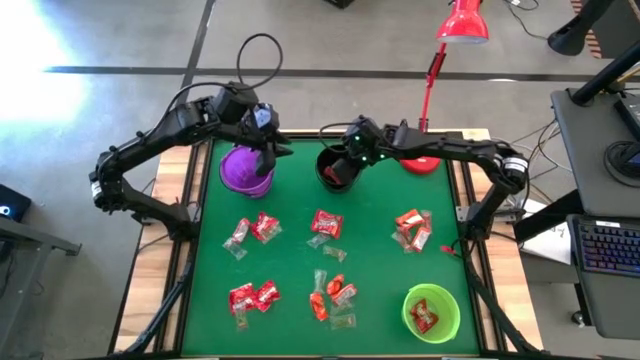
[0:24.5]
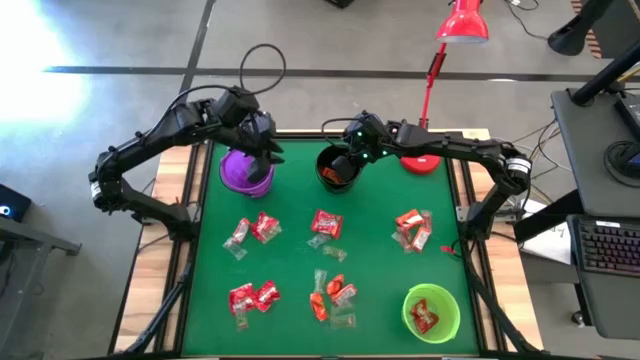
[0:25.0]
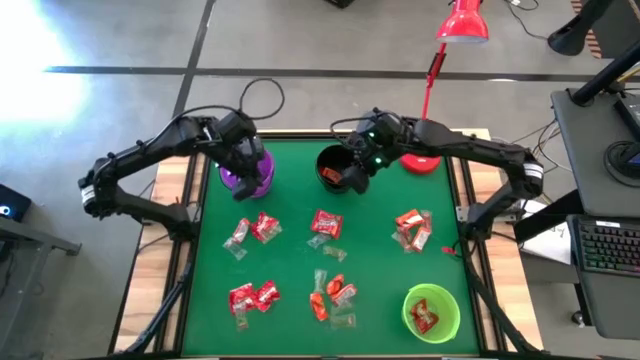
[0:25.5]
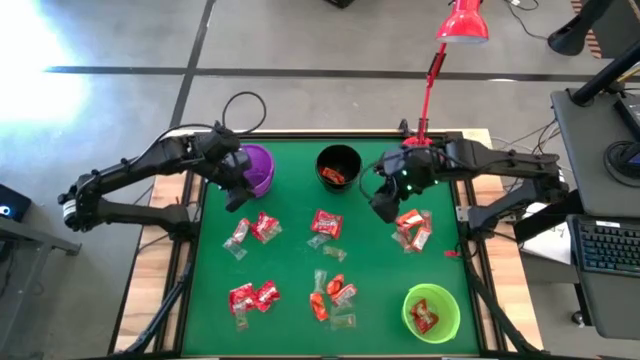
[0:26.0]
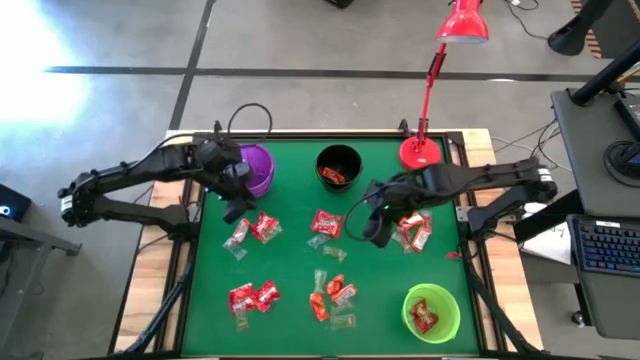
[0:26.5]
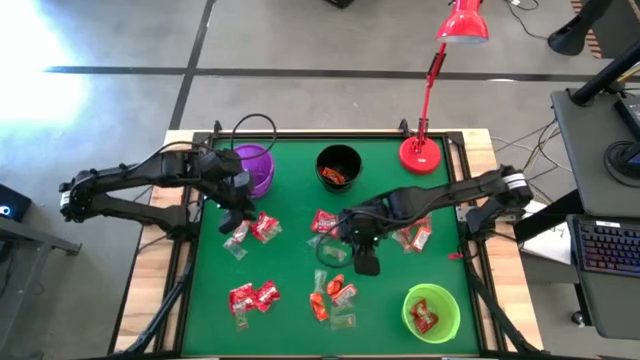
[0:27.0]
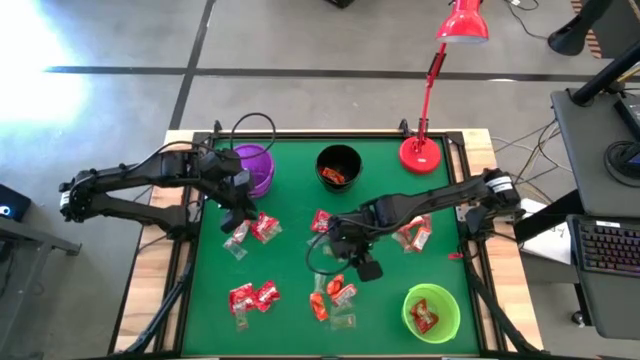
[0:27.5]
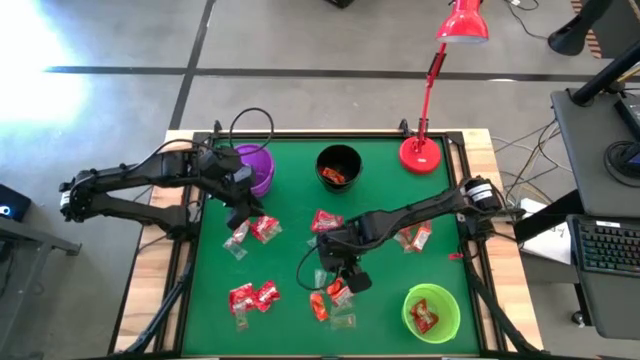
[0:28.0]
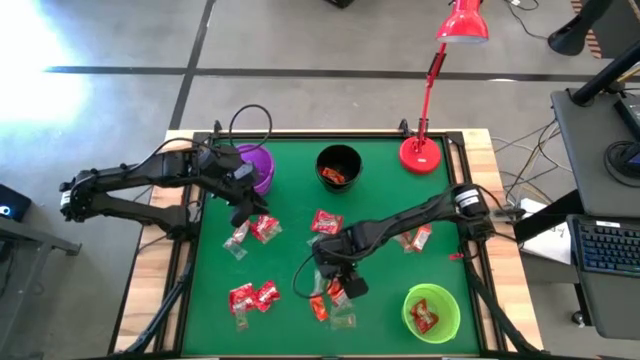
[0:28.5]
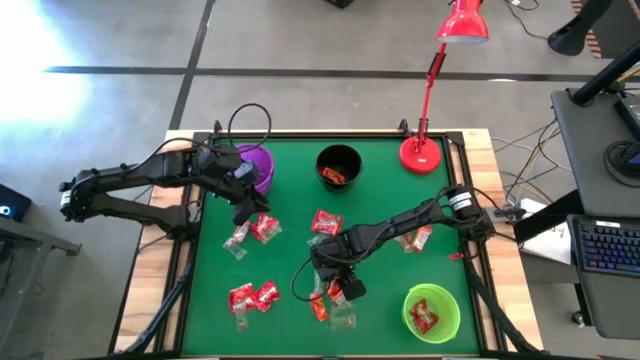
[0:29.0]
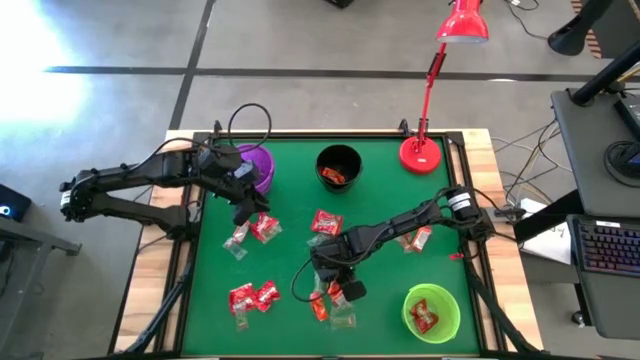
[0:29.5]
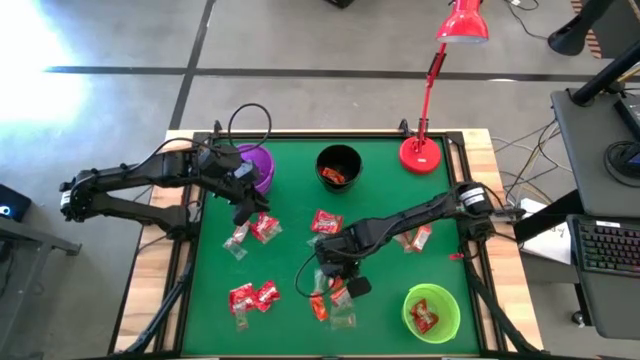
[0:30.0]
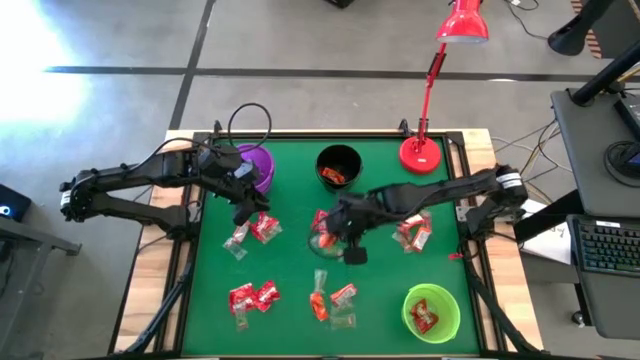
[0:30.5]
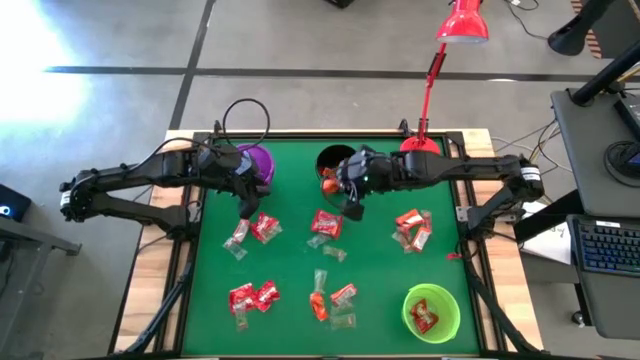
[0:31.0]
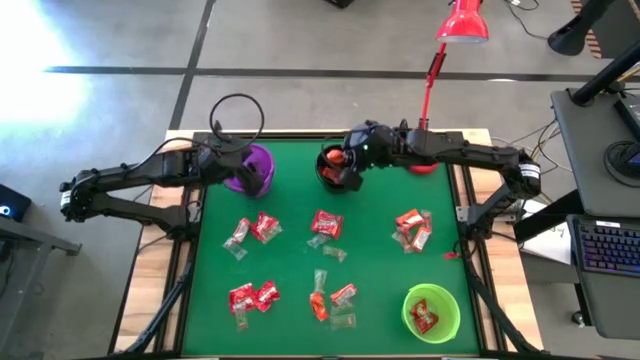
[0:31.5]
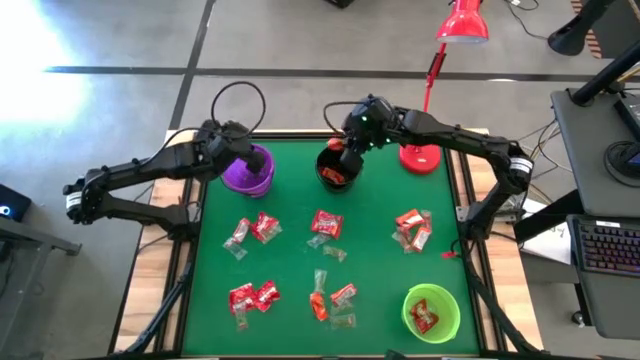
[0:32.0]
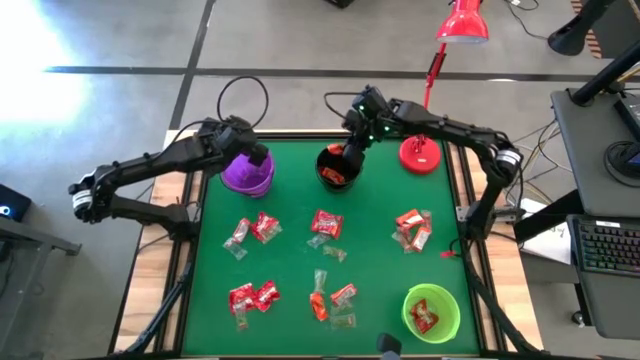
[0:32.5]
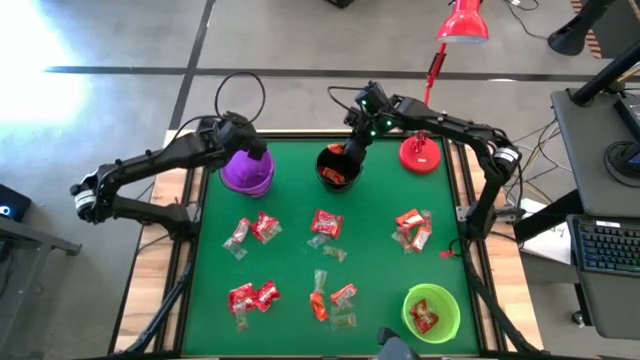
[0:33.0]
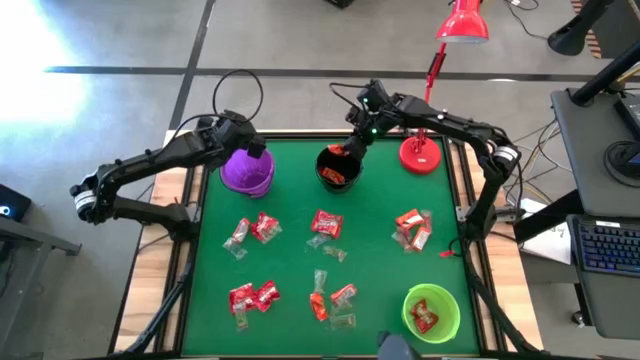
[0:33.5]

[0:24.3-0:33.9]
Task: Sort candy
Put the orange chocolate into the black bucket

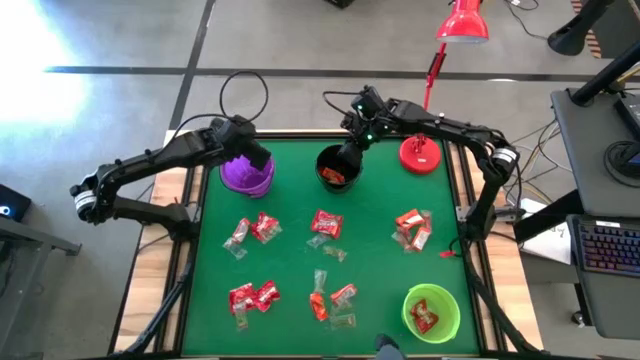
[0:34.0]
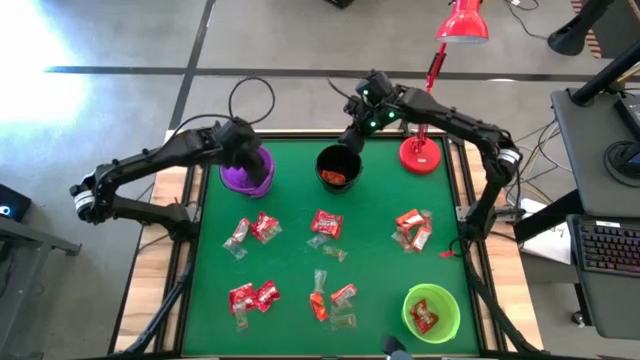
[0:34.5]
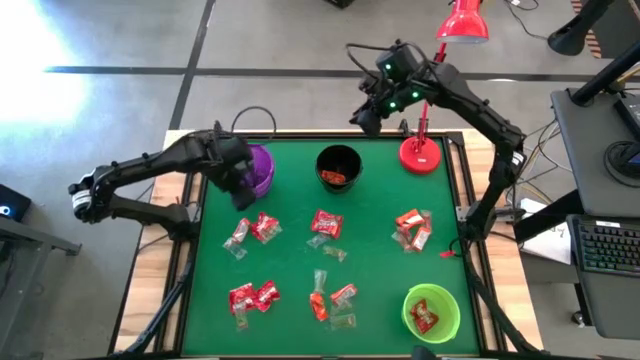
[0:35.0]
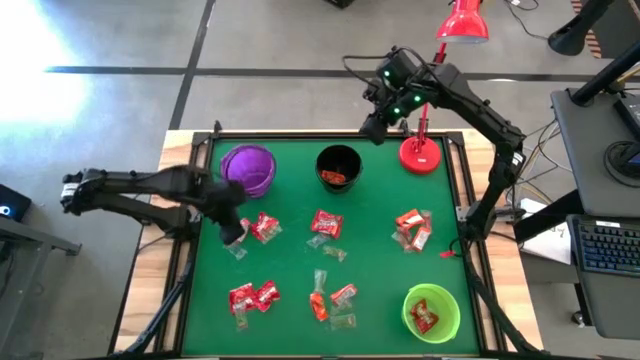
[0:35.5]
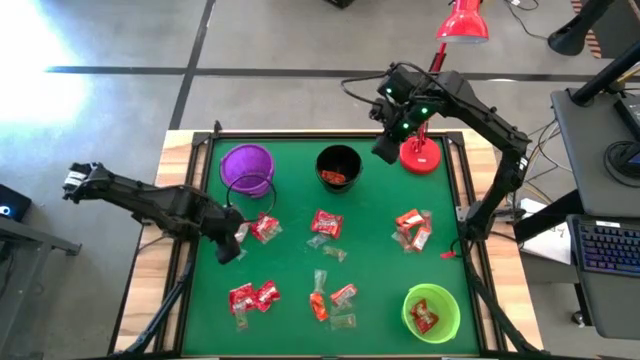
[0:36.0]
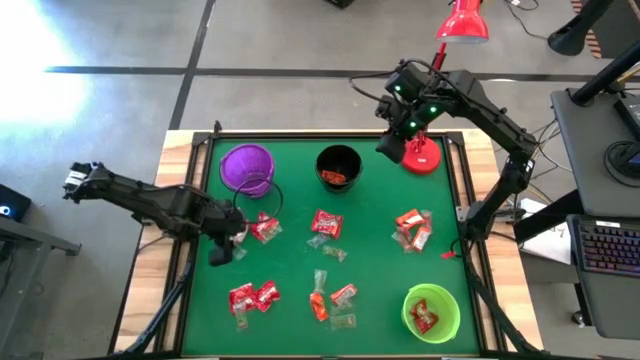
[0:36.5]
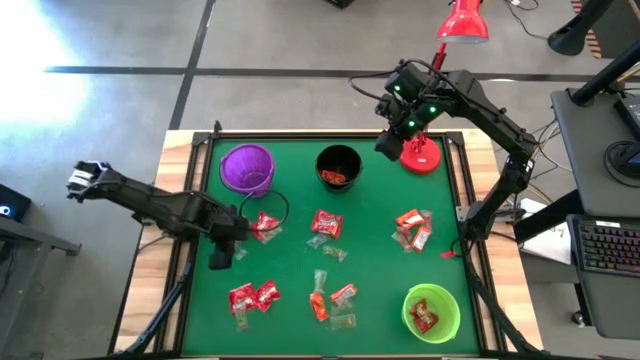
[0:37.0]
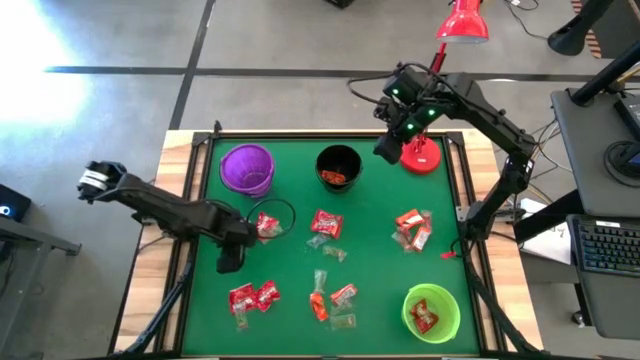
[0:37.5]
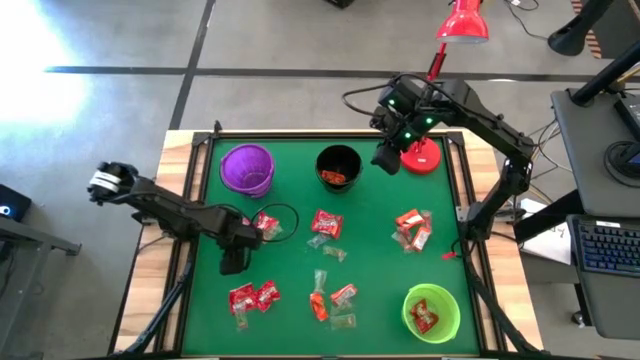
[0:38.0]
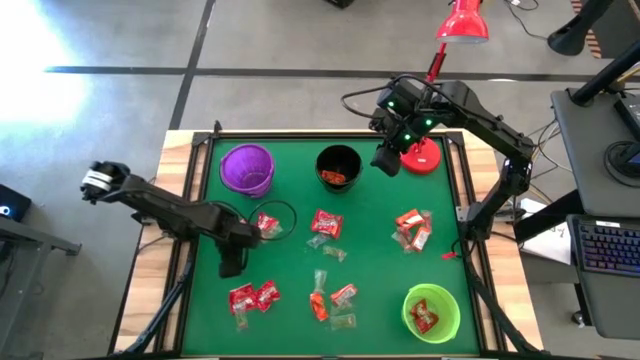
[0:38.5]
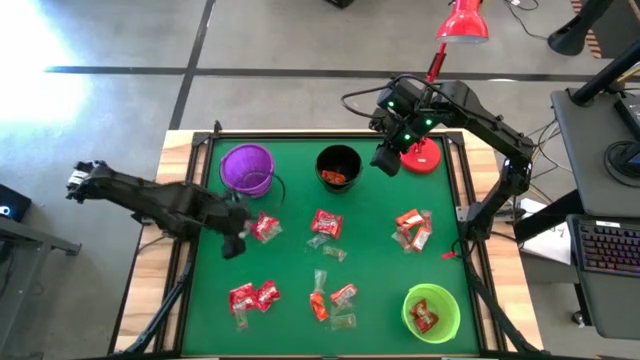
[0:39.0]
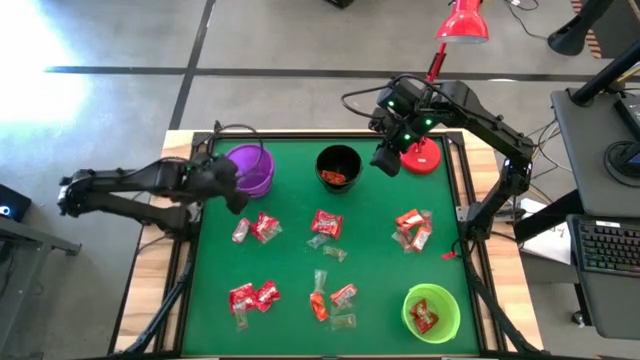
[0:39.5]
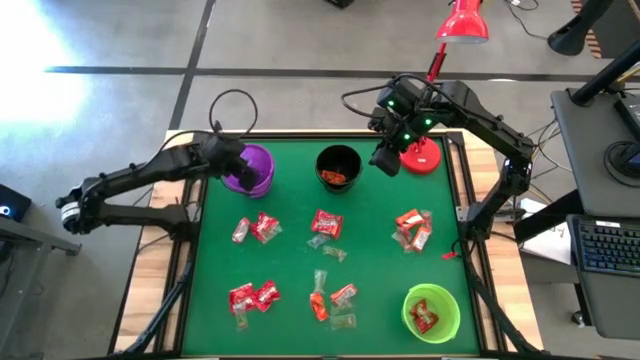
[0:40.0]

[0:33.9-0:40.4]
Put the blue gummy into the violet bucket

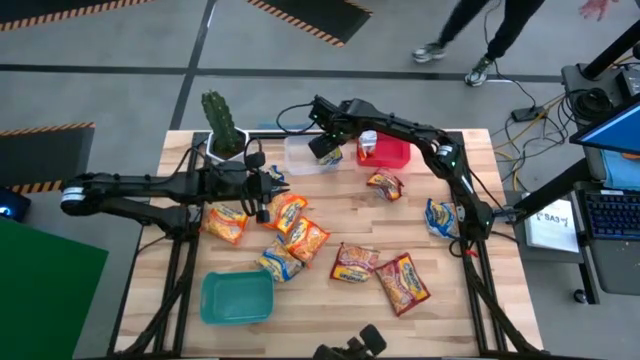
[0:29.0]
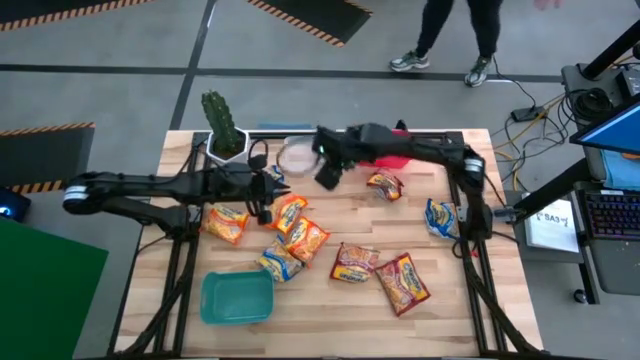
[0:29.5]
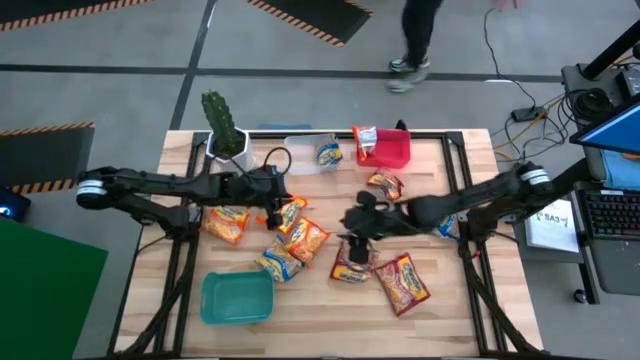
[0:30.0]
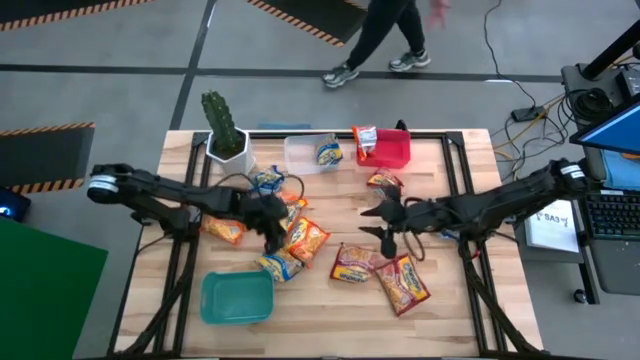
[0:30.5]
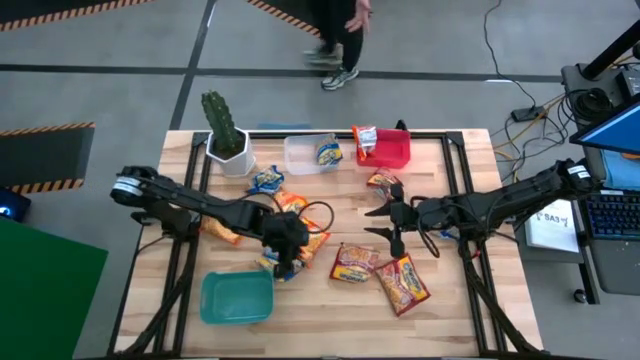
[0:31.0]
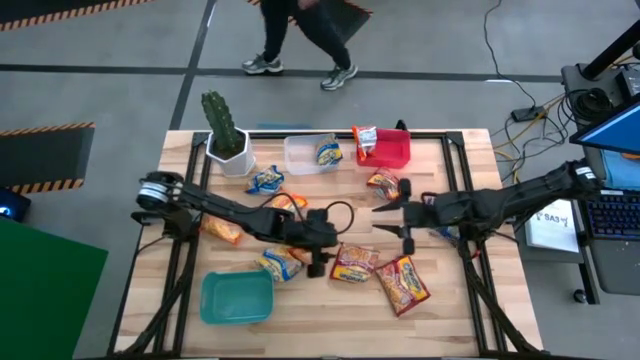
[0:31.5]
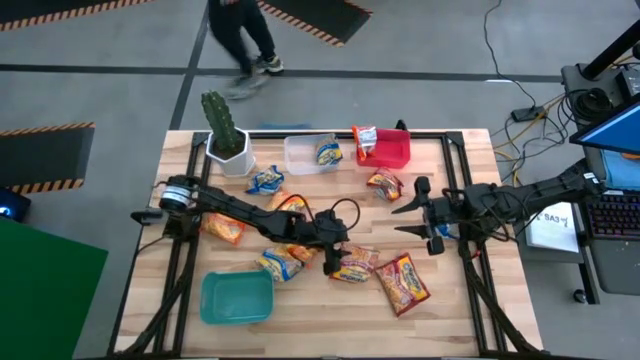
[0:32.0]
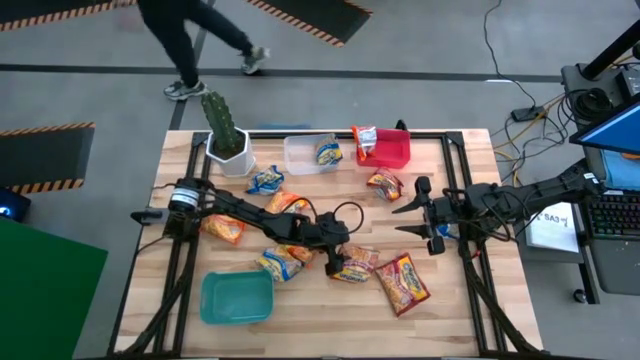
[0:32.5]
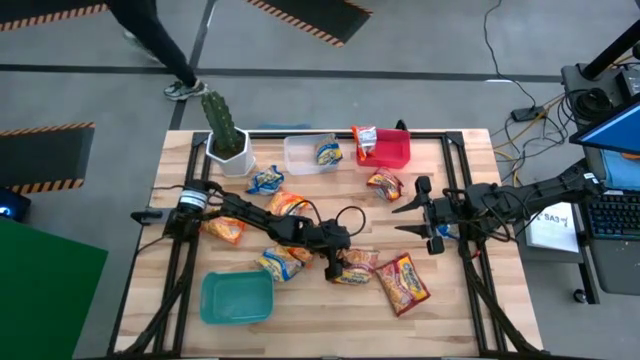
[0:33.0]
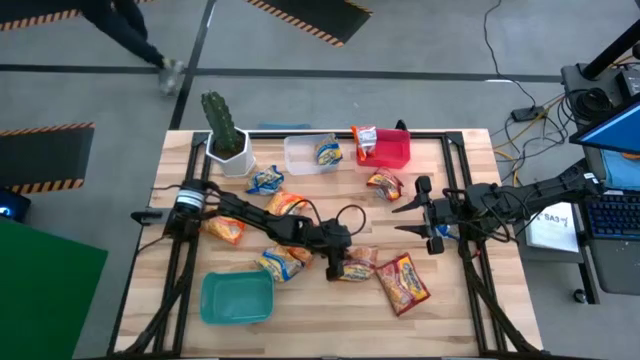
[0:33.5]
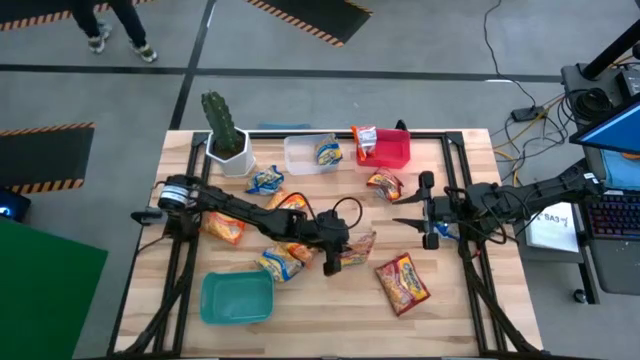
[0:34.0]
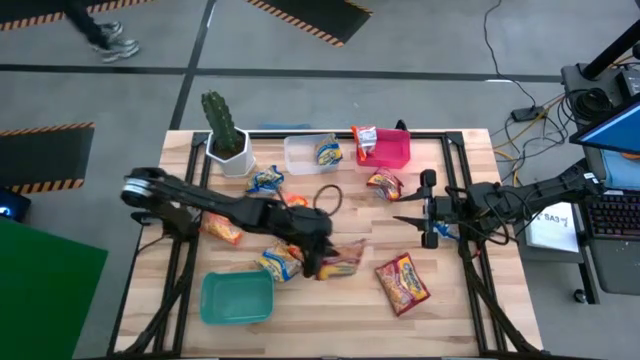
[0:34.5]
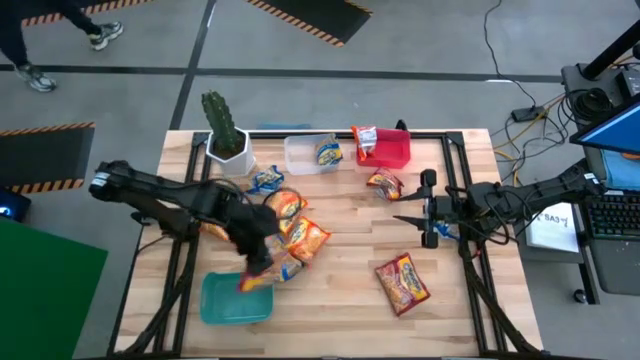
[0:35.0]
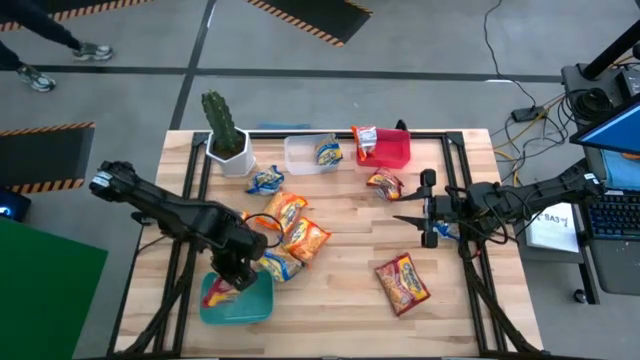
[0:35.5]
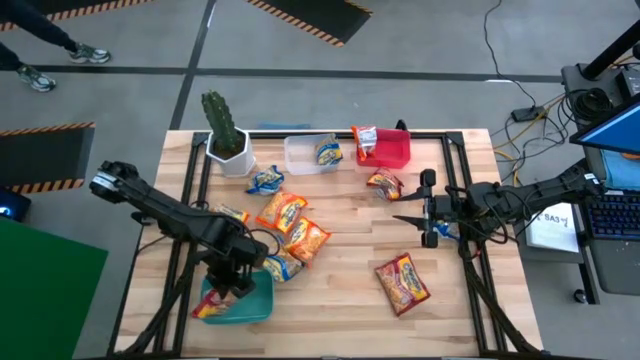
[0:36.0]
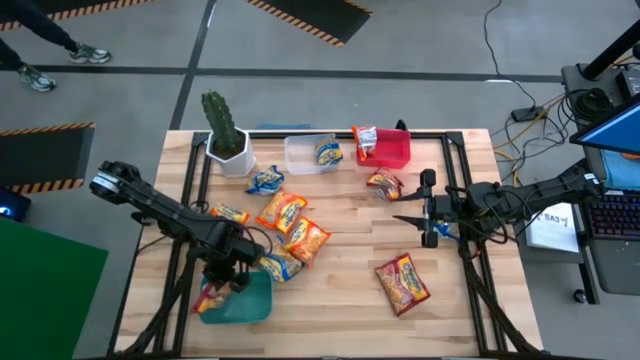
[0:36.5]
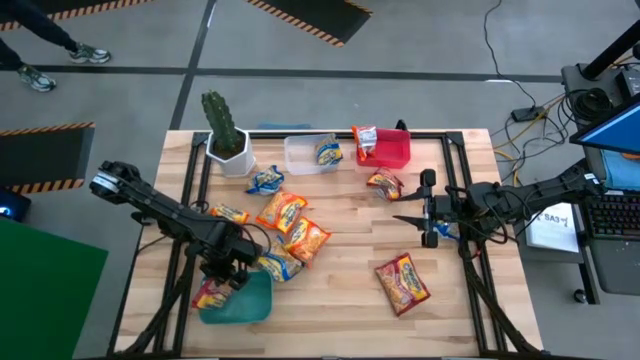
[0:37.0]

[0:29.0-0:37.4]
Task: Sort Maruchan noodles
Put the red noodle pack into the green bin
